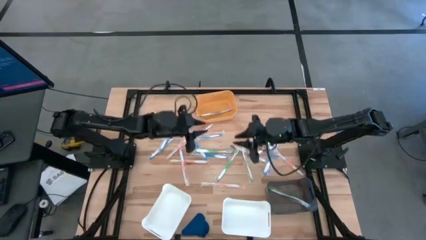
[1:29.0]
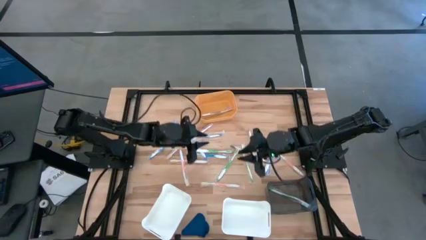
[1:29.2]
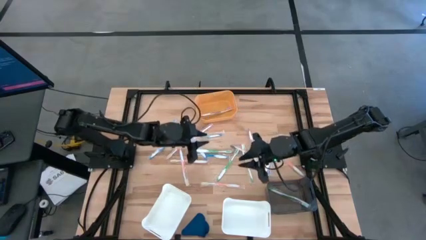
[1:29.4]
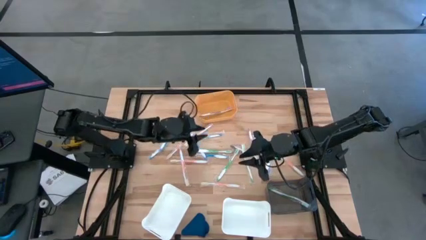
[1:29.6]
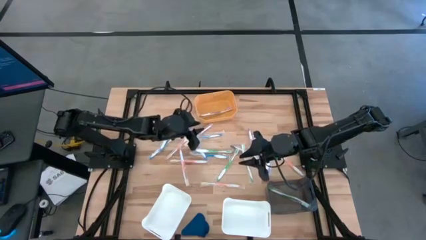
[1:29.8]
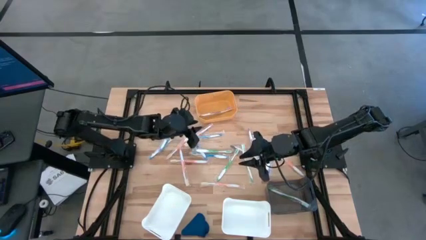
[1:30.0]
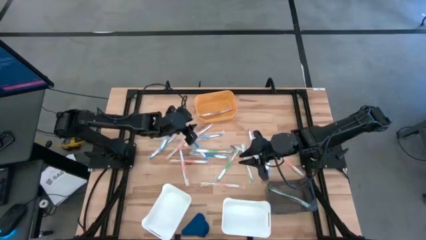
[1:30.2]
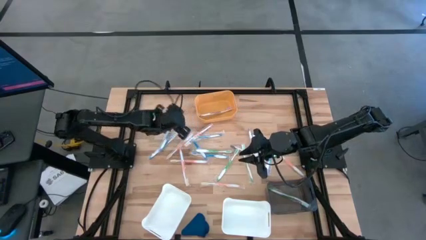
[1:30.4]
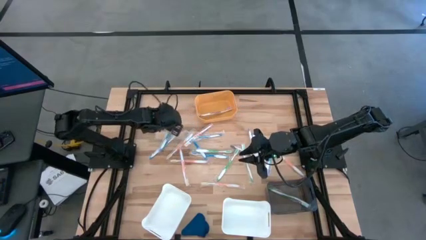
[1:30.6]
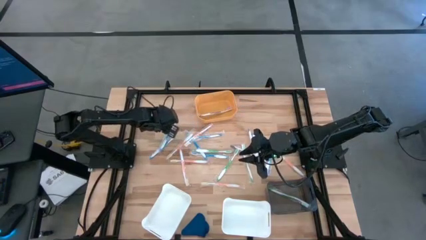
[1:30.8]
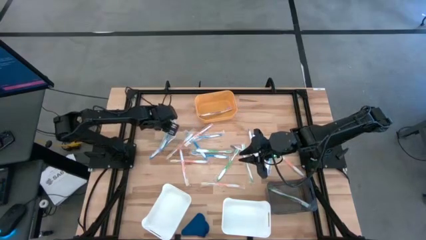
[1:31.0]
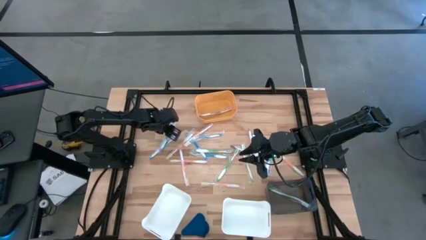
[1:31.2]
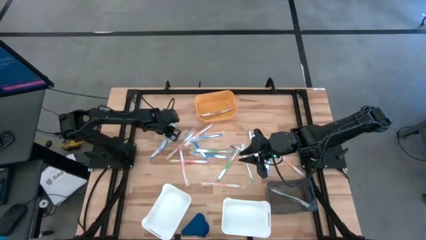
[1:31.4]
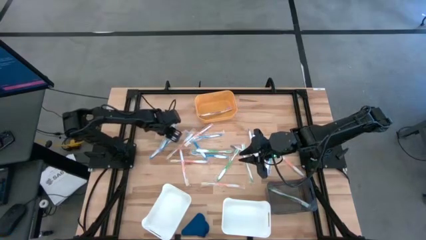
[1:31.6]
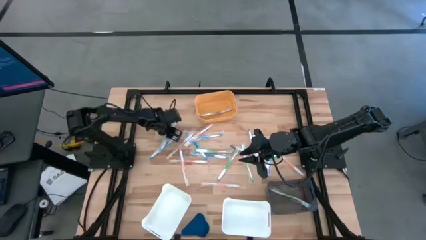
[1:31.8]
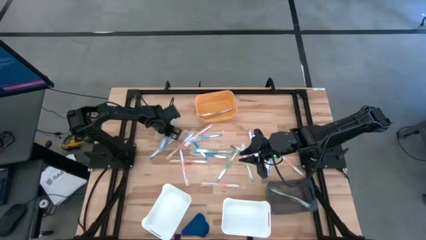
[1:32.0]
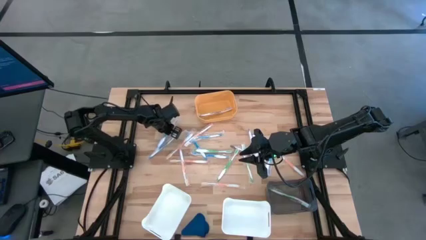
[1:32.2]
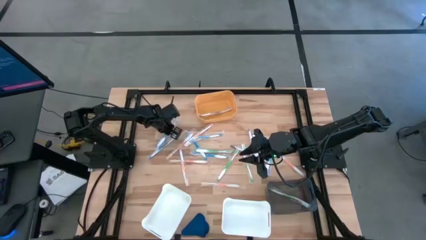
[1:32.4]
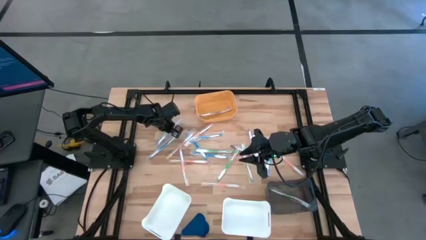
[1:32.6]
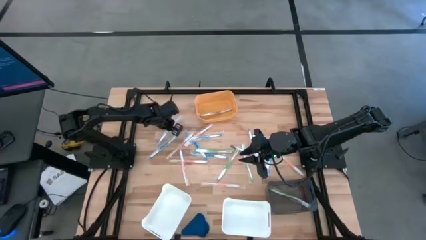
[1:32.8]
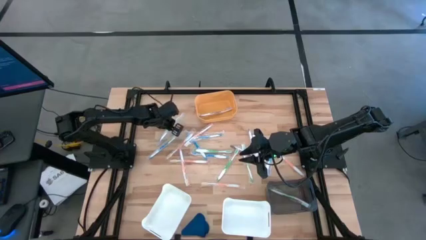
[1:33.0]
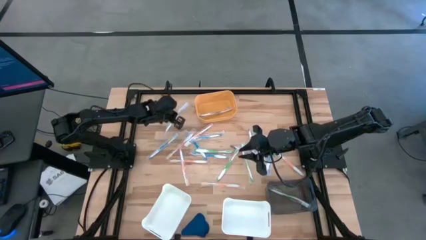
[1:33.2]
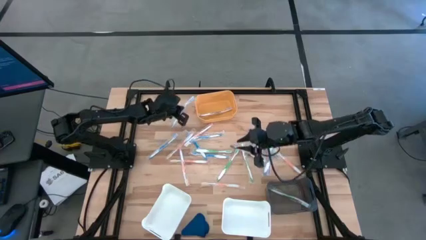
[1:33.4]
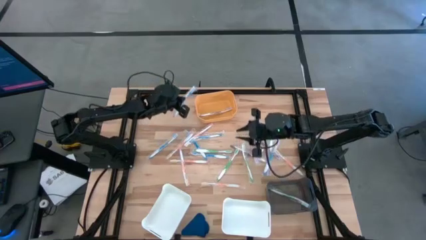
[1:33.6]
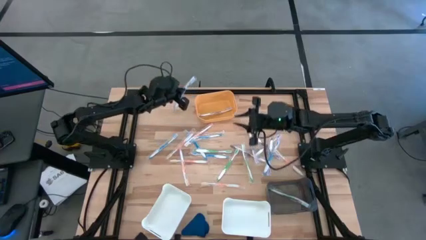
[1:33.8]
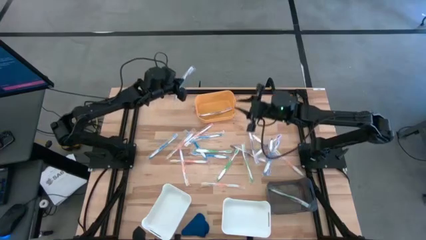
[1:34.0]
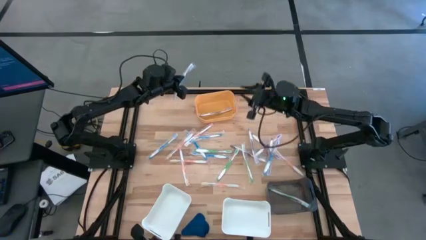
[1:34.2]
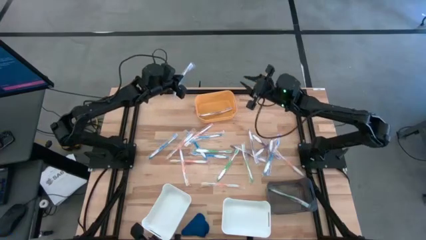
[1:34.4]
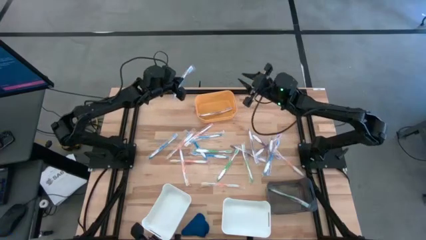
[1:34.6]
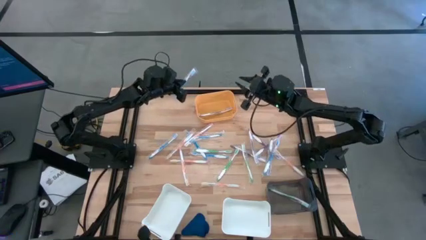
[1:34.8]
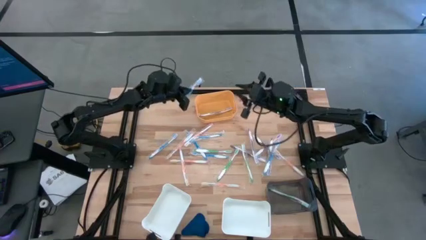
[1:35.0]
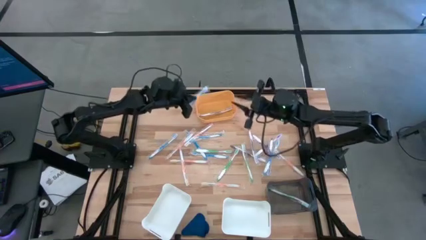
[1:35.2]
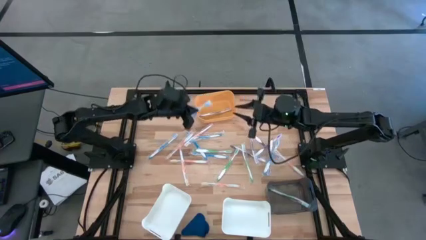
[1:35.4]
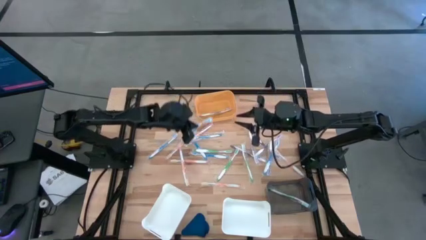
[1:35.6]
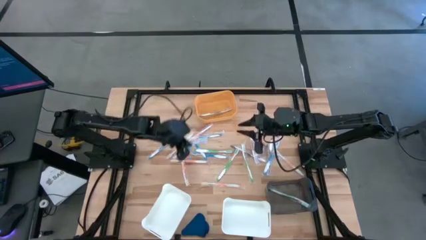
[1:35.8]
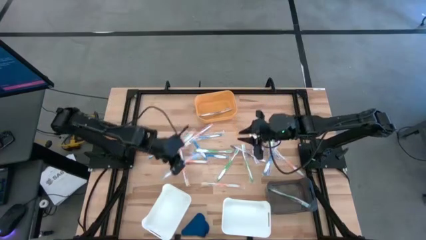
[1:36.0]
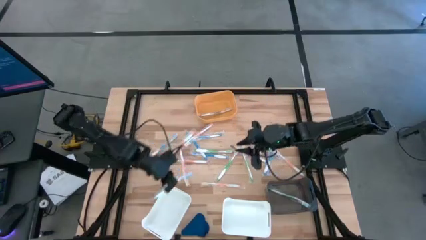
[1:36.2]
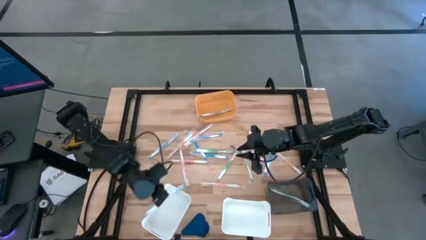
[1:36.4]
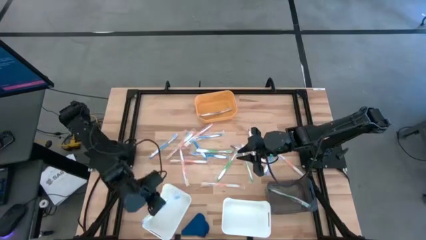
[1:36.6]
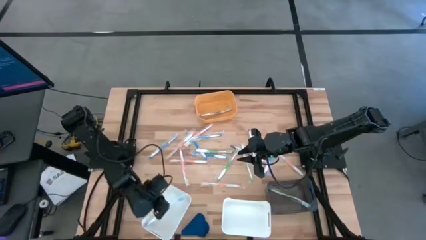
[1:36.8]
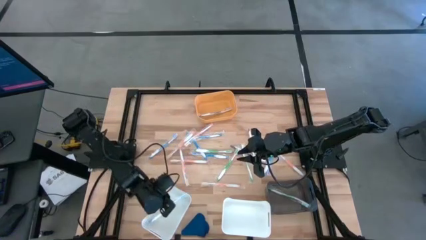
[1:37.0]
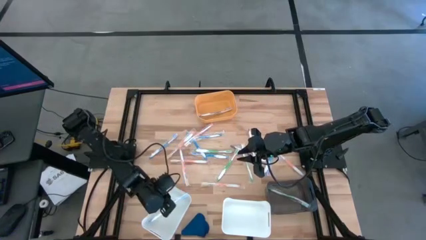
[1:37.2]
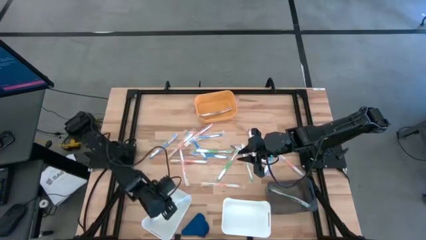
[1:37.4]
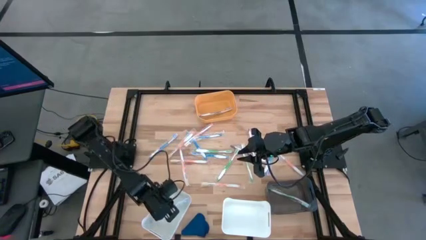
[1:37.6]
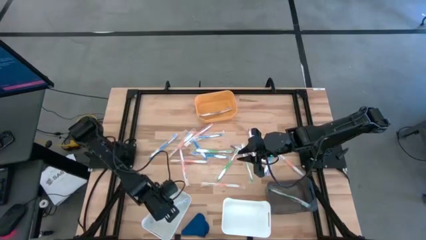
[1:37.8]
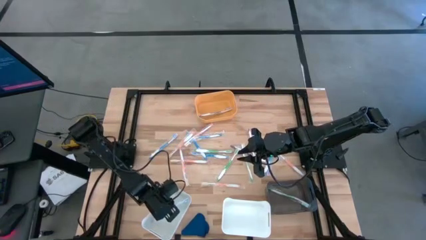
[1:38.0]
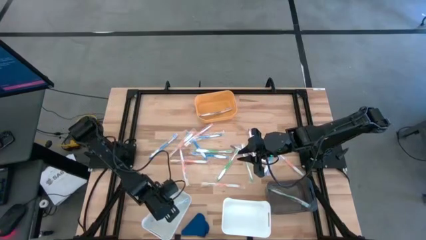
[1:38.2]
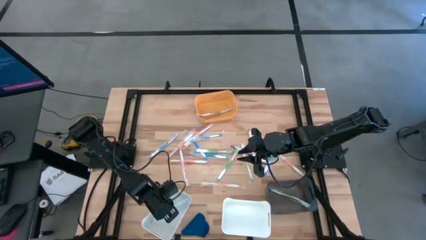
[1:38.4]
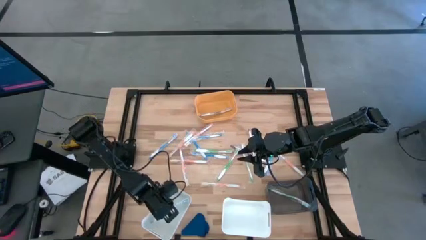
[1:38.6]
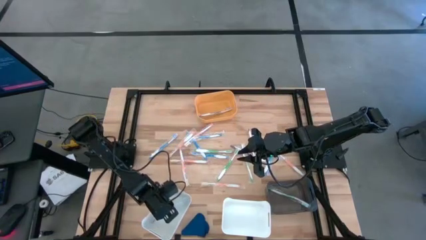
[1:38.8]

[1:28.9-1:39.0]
Task: Pick & Place Toothbrushes
Put the blue toothbrush into the left white bin

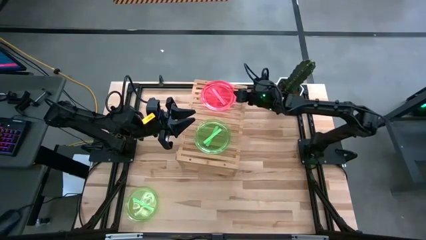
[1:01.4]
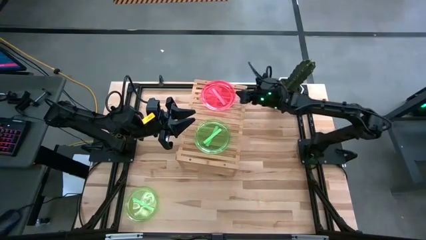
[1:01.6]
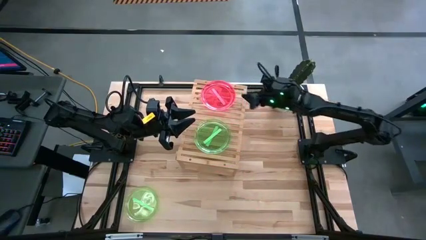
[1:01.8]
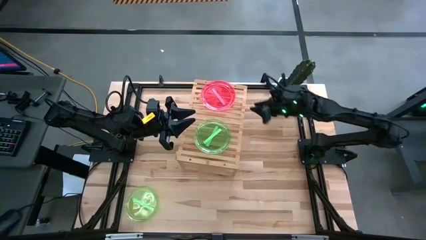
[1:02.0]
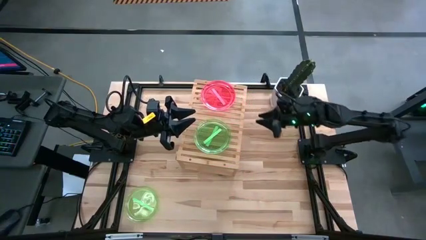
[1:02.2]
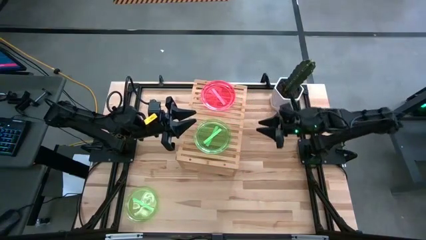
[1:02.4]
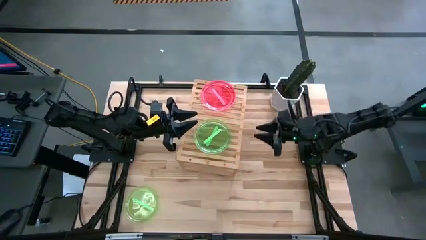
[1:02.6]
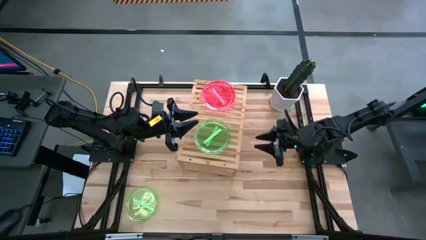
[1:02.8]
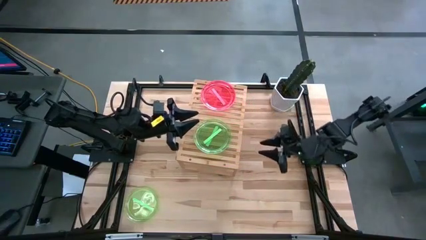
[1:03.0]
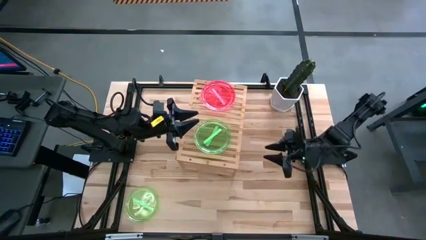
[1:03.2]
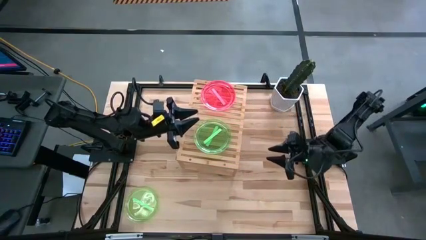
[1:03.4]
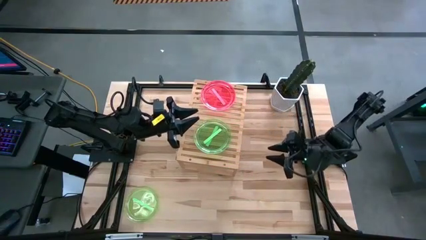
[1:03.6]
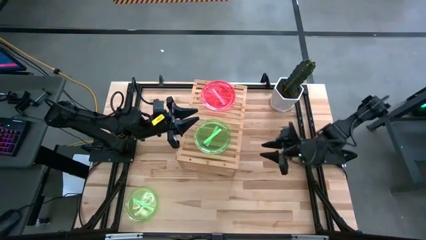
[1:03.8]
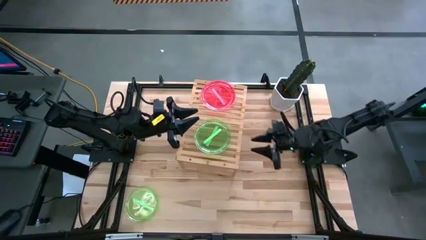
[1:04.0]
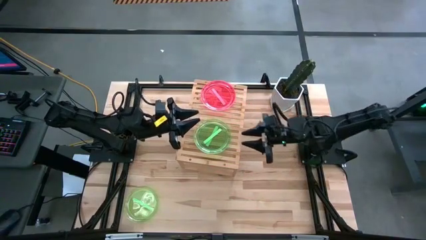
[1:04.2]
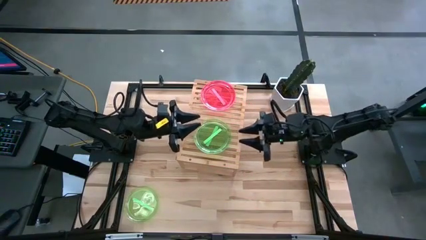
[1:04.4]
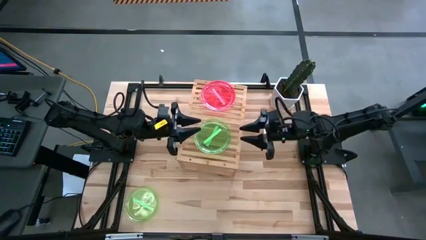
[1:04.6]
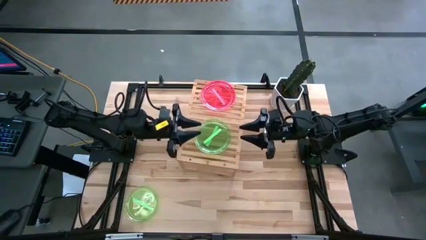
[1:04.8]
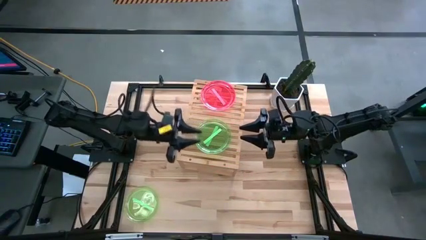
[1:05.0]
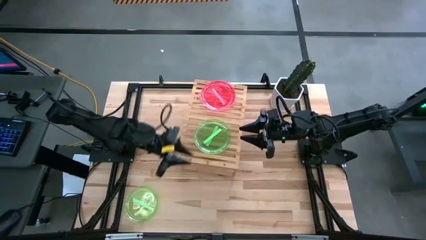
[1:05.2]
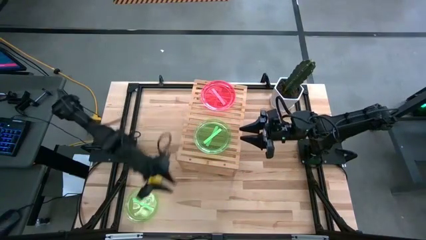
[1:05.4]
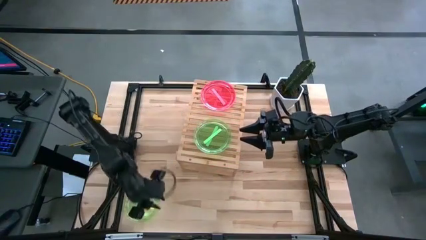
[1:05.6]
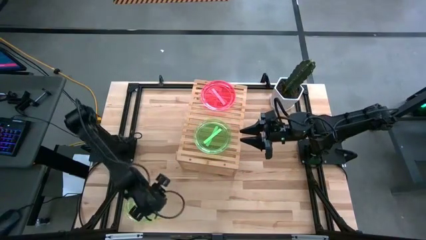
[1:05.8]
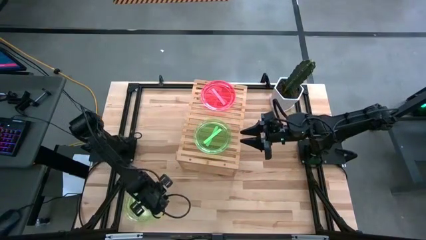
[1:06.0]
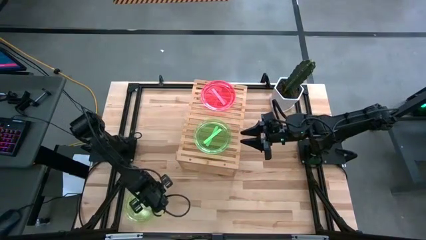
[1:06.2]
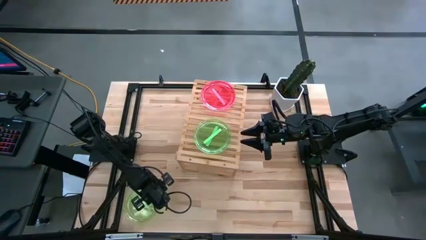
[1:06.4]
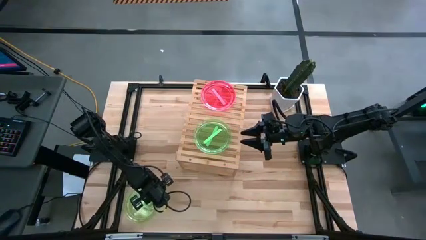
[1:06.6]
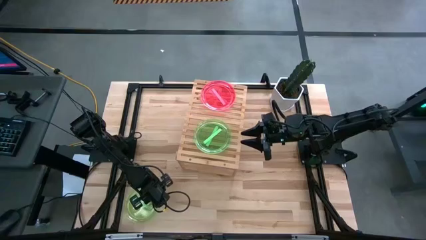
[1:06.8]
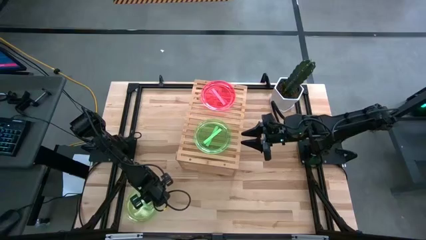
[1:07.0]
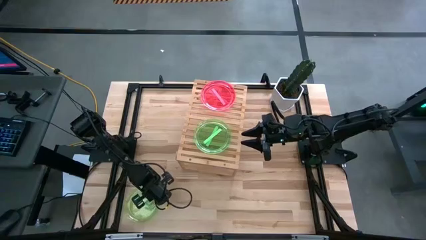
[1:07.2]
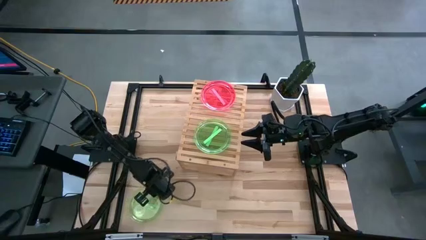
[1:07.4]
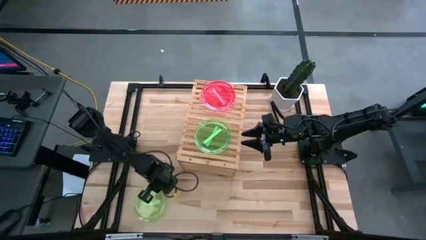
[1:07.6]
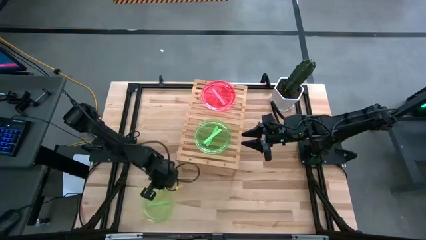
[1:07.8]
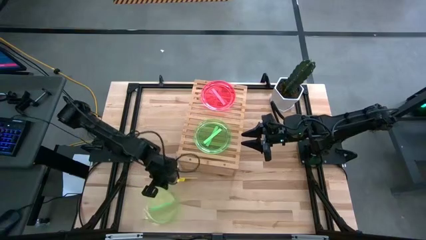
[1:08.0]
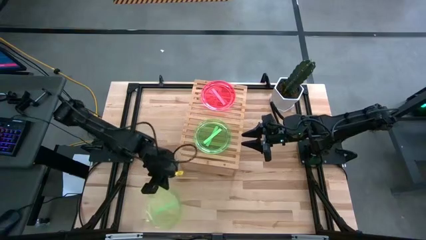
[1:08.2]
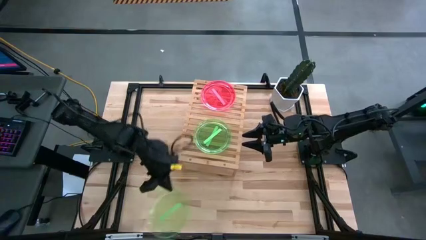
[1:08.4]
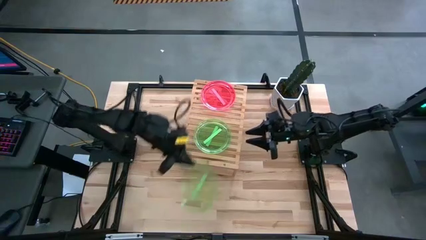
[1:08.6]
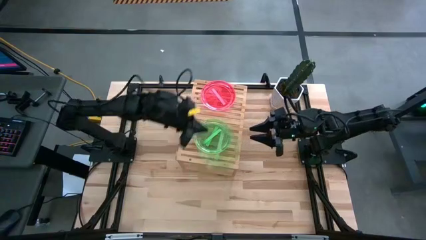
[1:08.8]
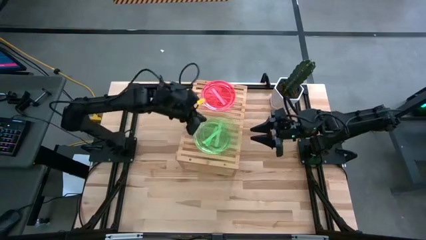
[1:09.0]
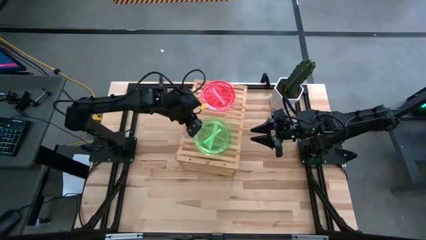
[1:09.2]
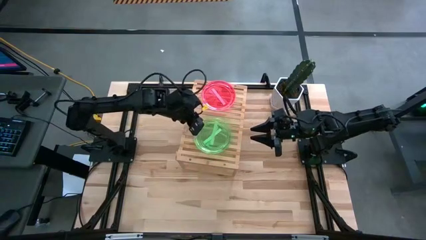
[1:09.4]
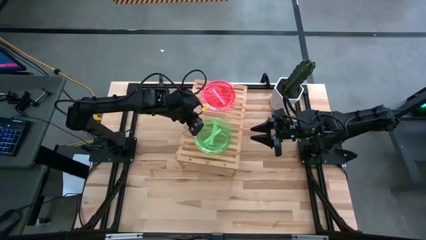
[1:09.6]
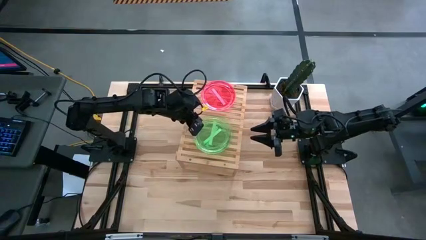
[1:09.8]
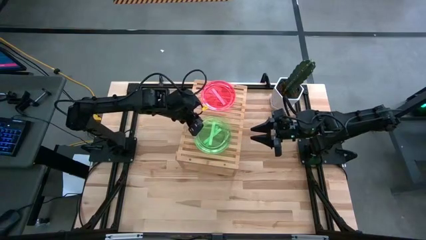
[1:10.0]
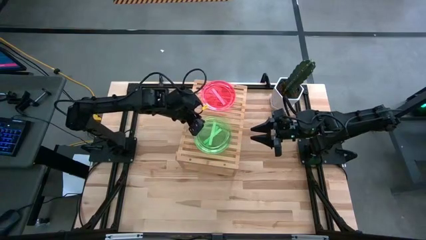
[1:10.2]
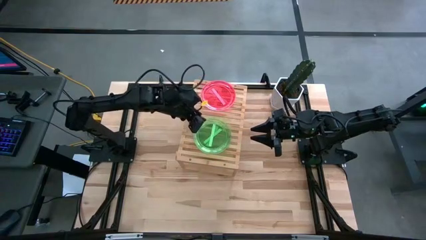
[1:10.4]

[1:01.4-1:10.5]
Task: Place and stack plates onto a shelf
Stack the green transparent plate on top of the other green transparent plates on the shelf
